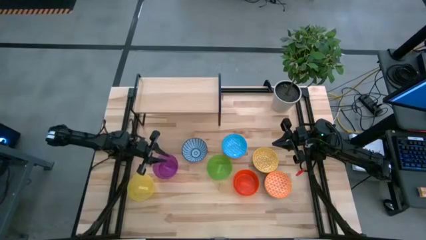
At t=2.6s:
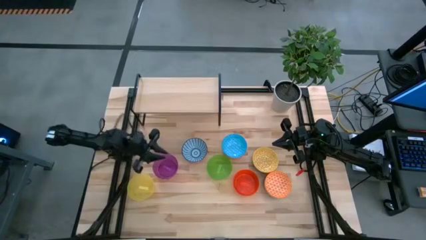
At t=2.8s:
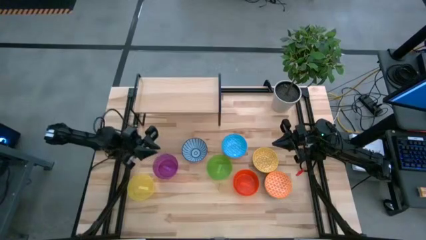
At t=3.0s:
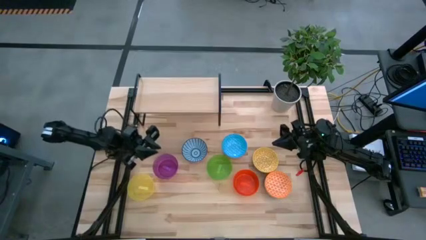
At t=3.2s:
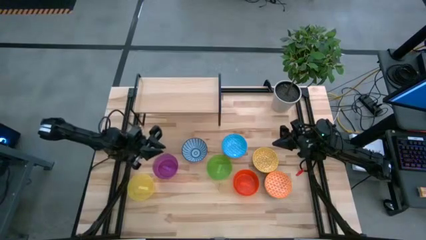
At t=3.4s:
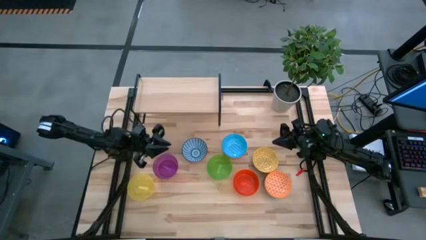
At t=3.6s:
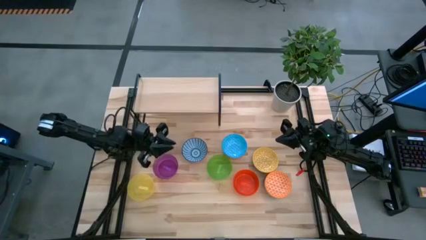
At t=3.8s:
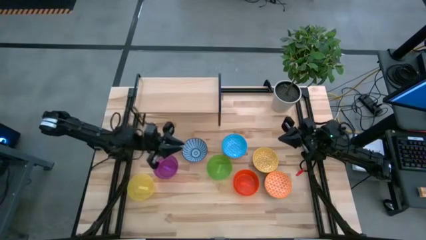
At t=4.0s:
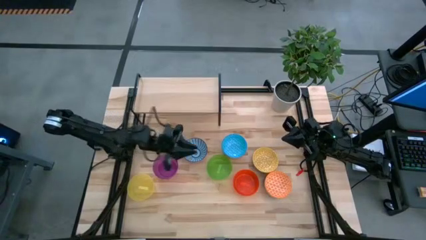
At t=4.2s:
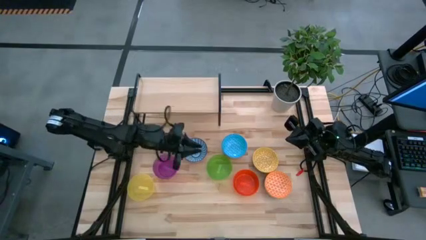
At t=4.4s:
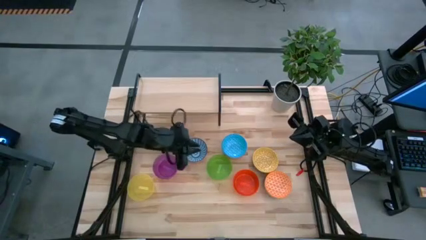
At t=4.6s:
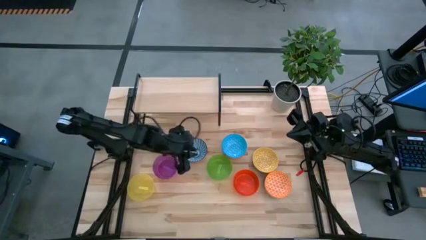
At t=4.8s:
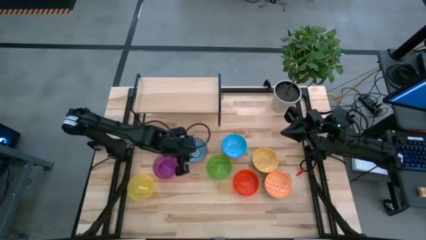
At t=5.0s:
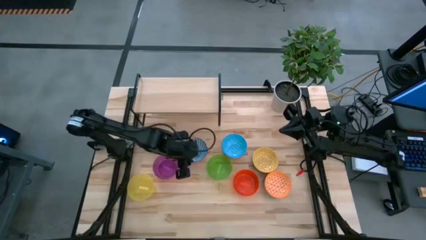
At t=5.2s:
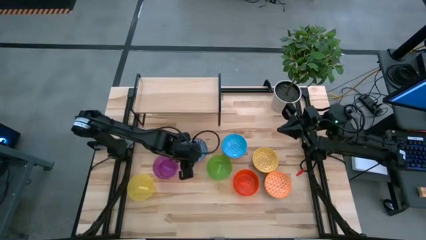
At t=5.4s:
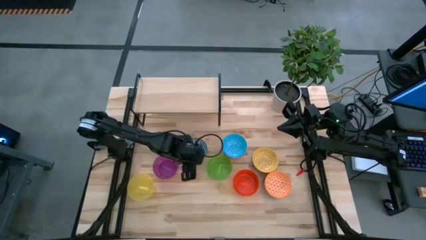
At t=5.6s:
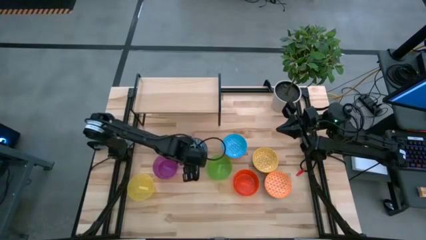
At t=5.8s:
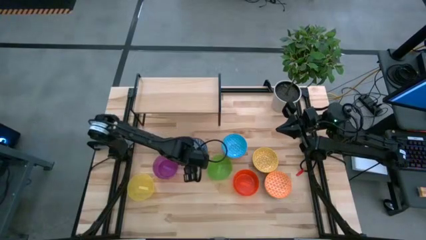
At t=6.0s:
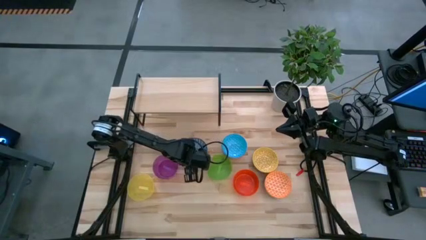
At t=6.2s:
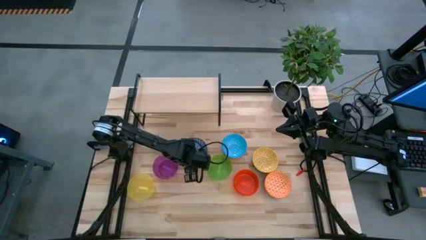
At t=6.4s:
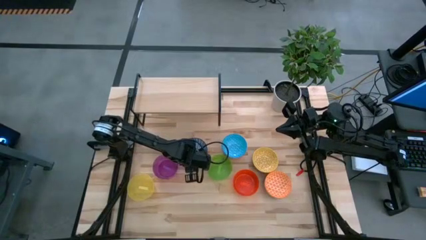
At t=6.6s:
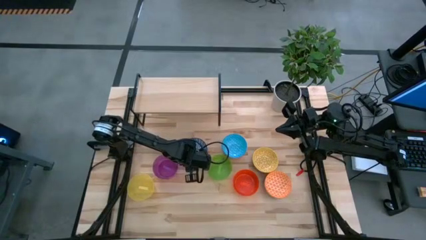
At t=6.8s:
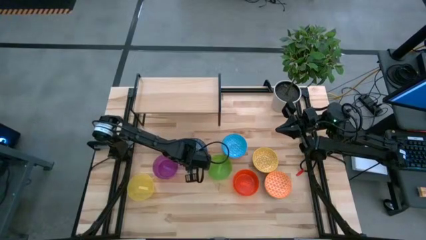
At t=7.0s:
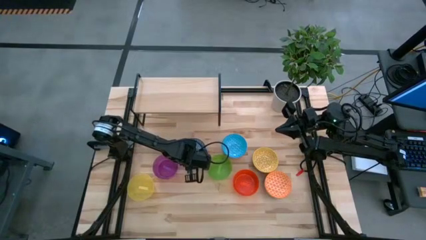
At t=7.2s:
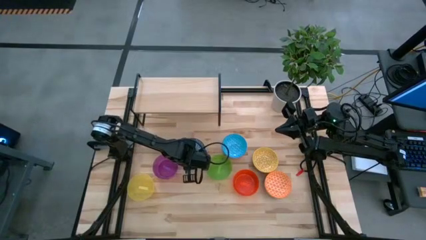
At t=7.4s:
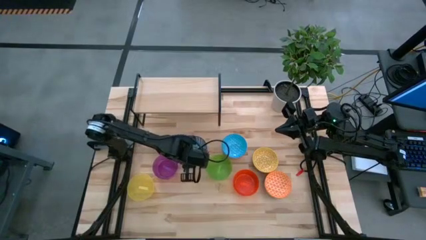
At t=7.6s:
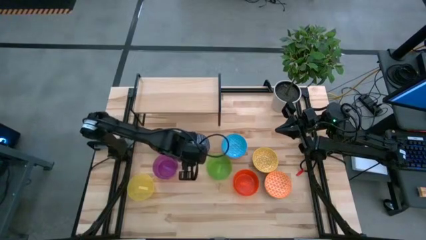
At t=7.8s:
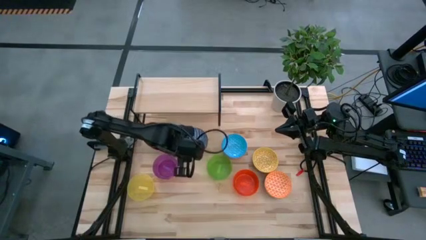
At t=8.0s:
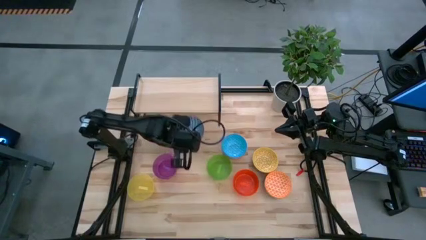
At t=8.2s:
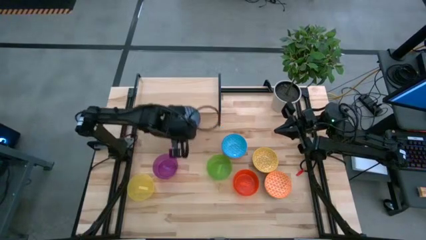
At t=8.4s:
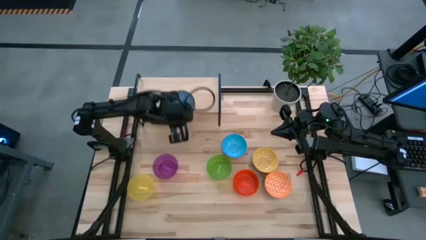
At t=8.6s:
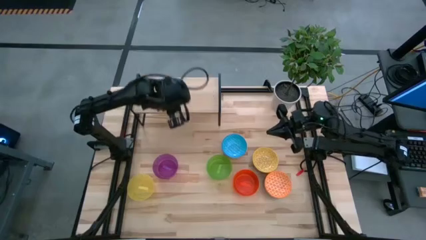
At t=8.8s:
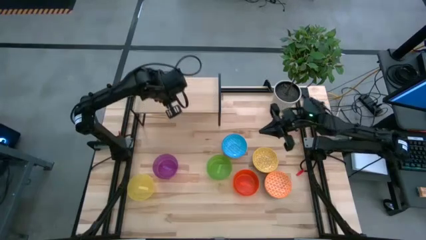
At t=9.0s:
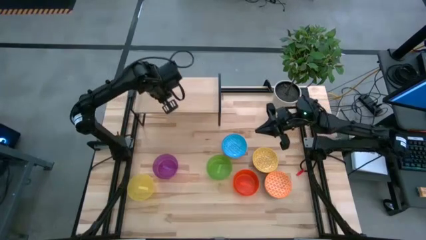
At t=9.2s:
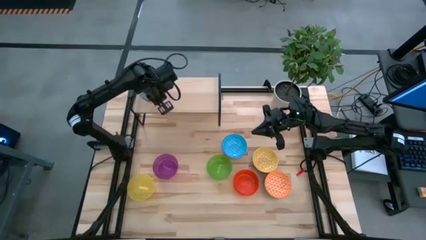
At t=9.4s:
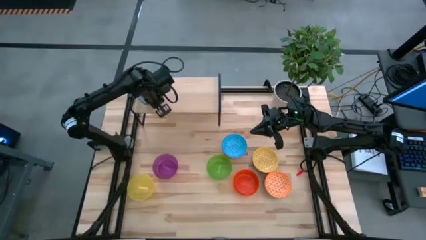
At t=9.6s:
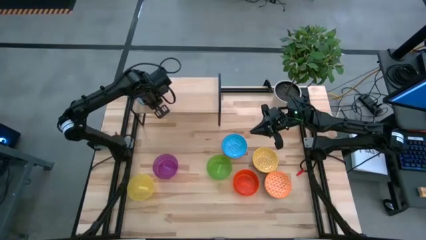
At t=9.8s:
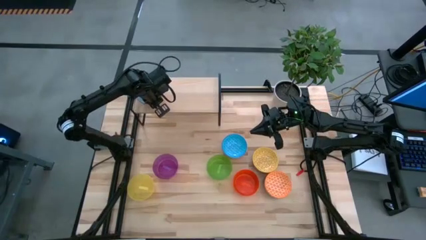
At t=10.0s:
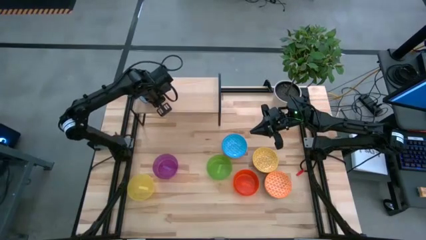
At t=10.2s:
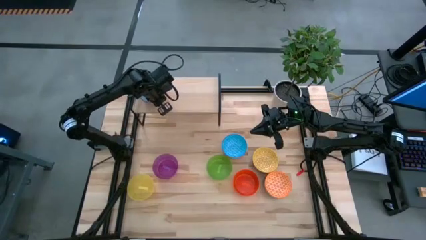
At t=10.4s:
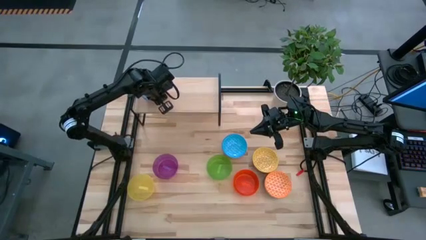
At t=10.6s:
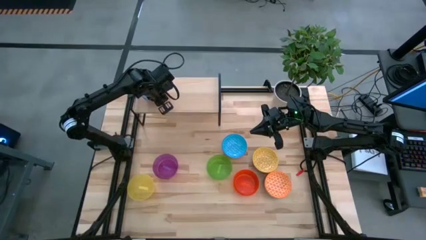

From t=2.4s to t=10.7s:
Task: Place and stack bowls onto a shelf
Put the blue bowl on the shelf

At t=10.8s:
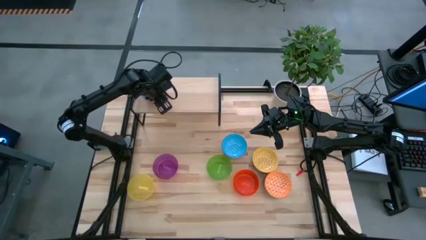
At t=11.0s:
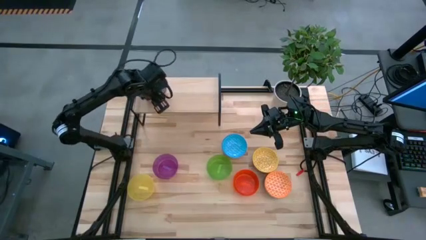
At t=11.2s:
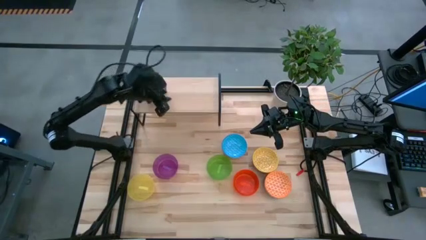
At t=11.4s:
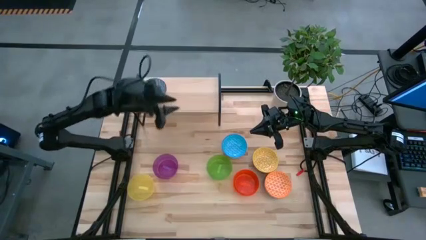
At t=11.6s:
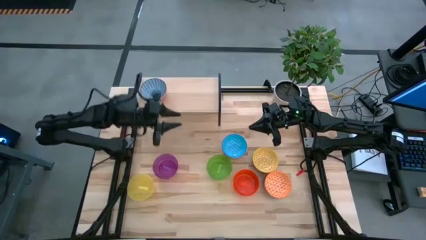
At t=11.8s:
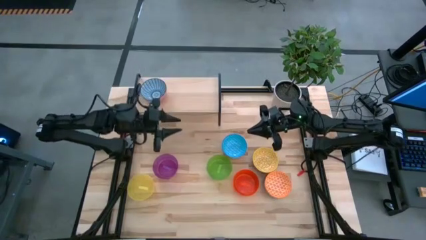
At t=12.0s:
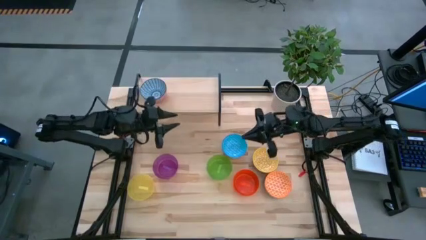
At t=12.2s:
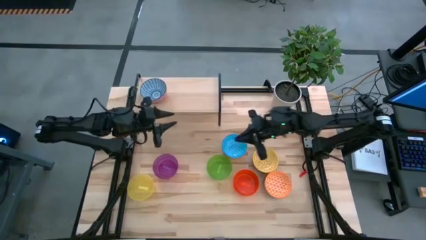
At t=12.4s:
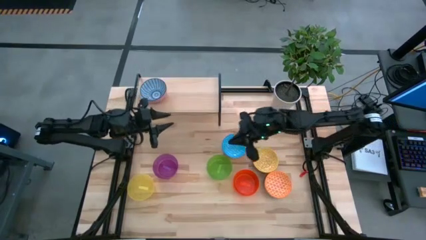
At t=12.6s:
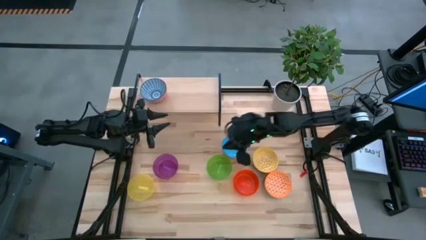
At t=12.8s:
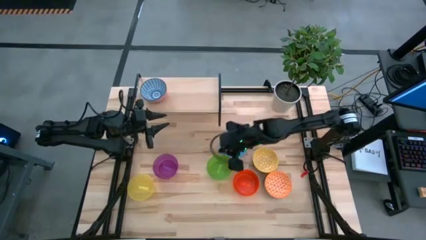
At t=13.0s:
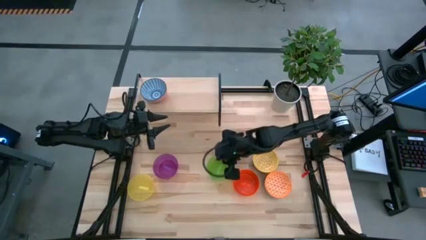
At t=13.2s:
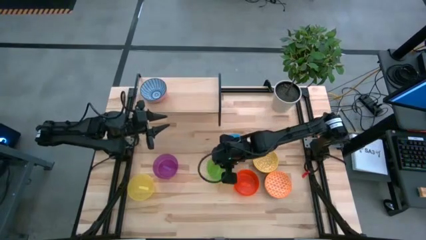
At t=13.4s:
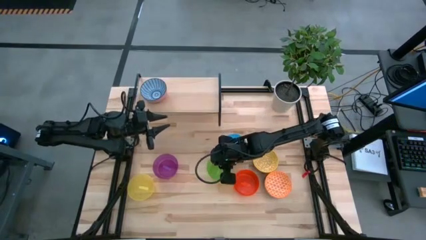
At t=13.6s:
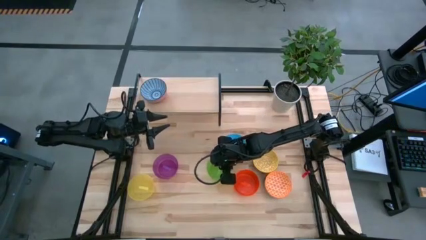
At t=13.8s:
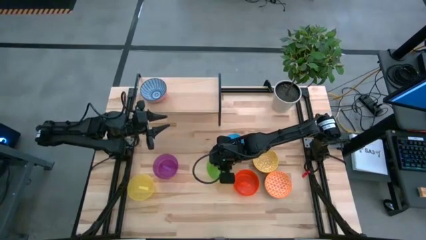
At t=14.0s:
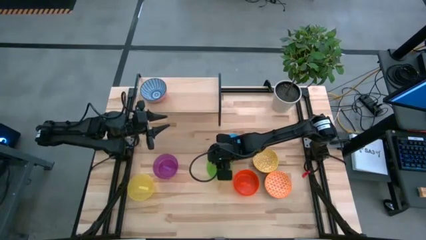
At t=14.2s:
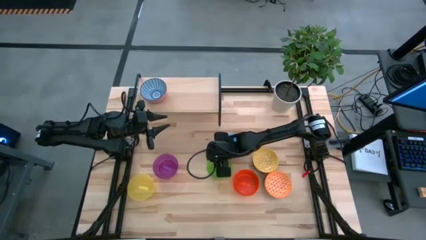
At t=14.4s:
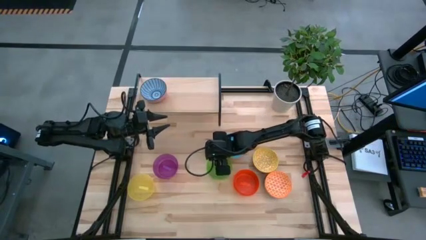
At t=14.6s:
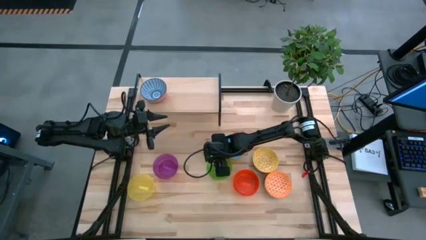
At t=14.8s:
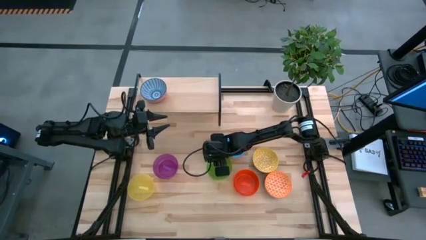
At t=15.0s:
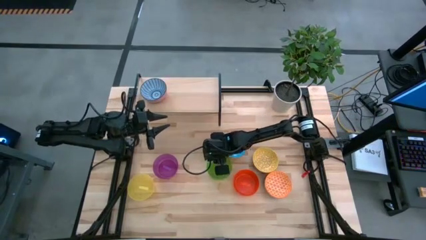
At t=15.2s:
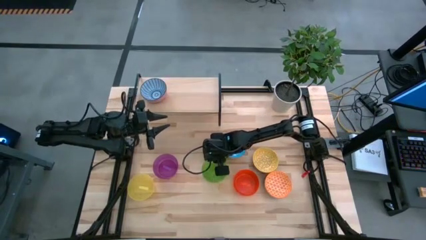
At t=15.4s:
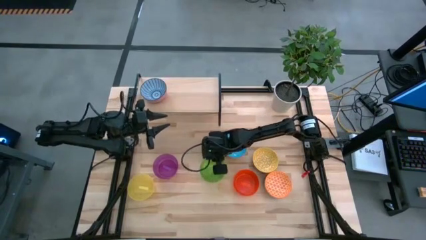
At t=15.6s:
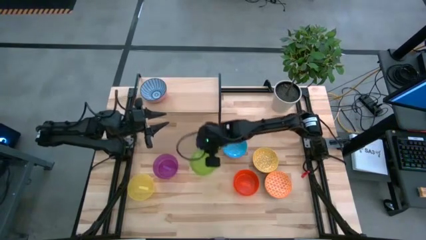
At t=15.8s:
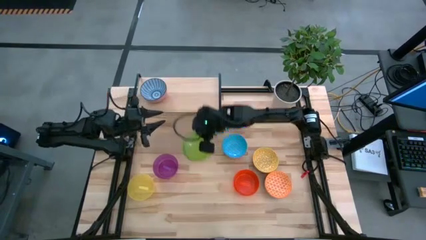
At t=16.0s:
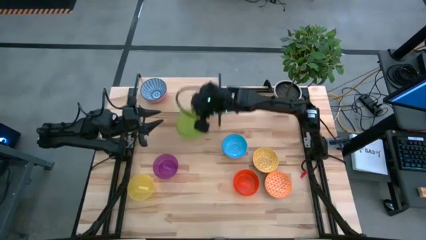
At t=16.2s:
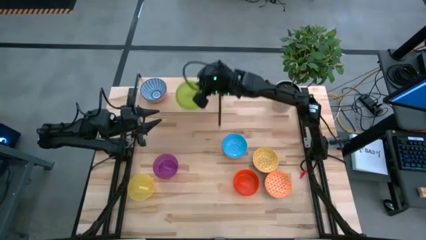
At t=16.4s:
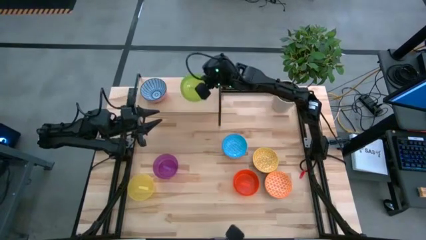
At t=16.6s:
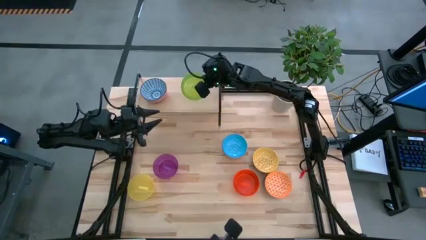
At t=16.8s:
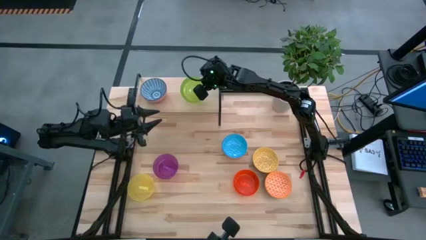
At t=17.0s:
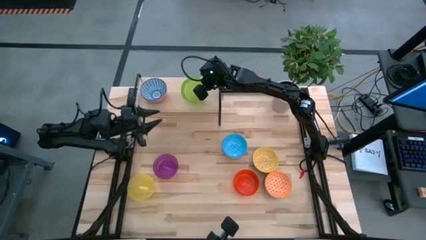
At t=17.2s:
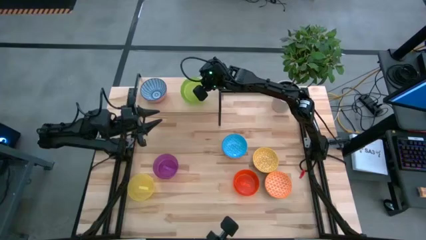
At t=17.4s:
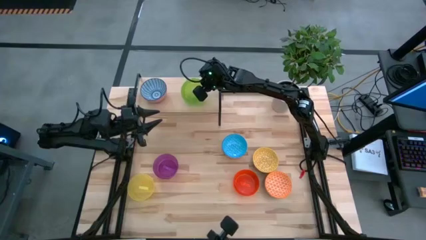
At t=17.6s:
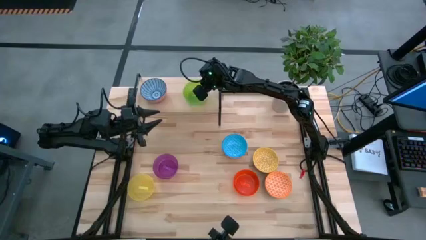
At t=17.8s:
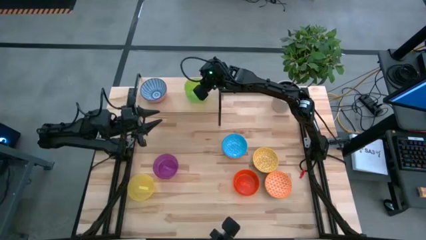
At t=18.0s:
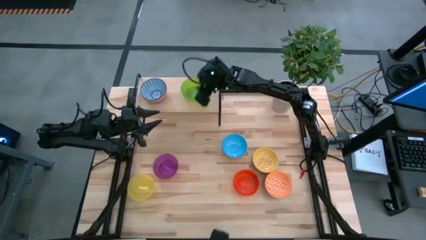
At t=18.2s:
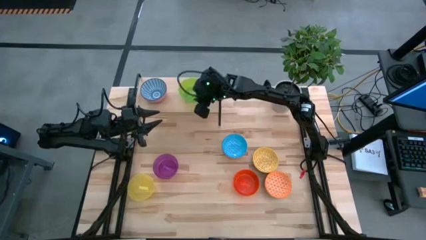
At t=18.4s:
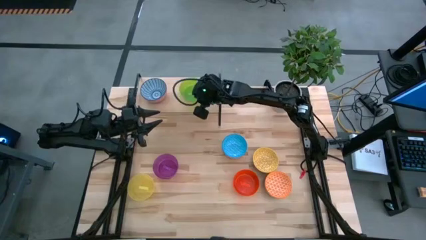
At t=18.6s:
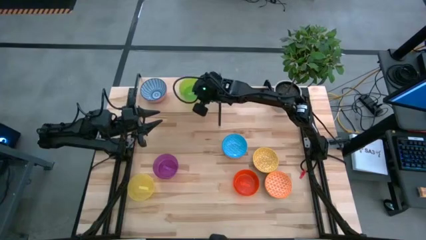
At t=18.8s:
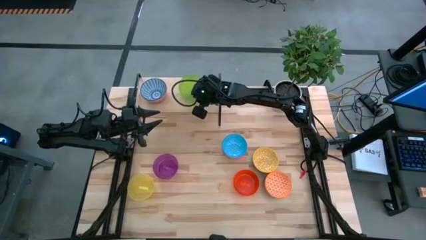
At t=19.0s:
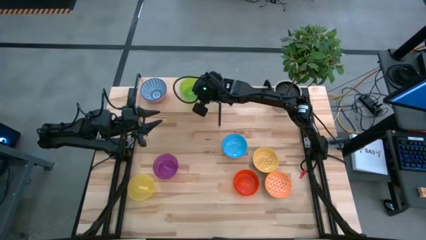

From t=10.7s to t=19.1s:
Put the green bowl on the shelf
